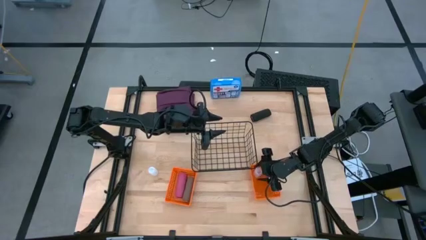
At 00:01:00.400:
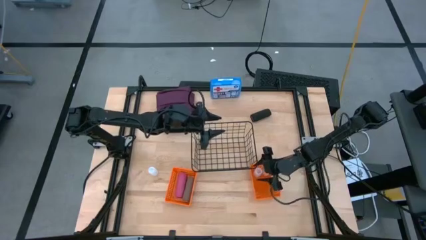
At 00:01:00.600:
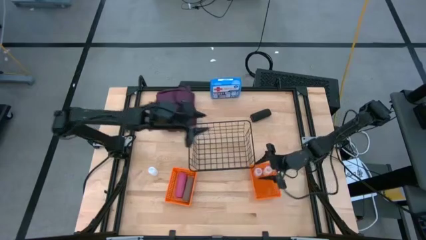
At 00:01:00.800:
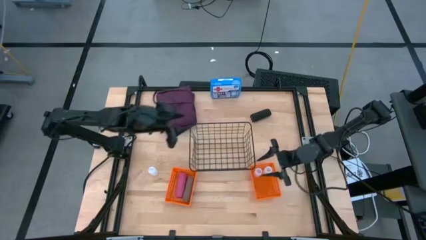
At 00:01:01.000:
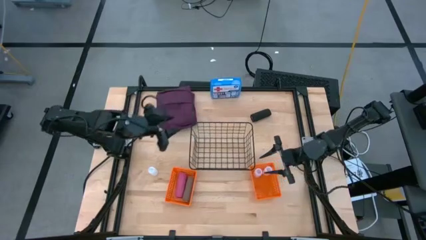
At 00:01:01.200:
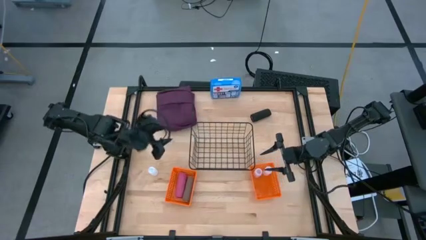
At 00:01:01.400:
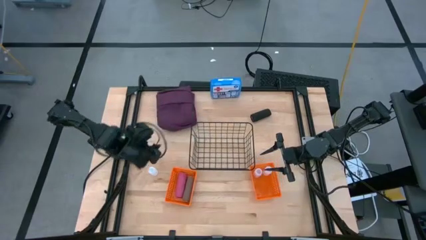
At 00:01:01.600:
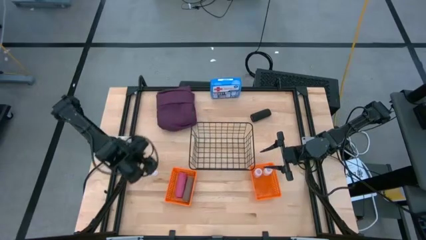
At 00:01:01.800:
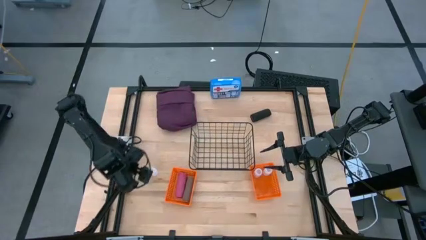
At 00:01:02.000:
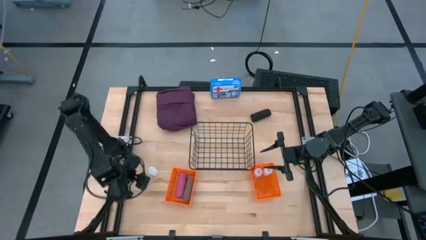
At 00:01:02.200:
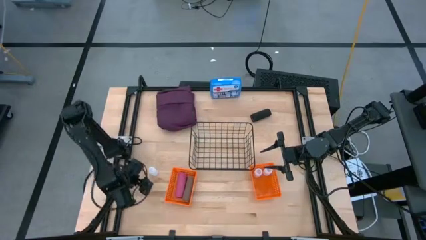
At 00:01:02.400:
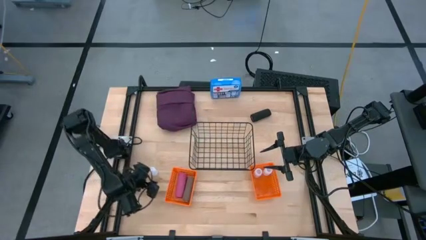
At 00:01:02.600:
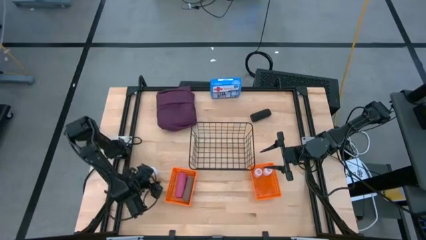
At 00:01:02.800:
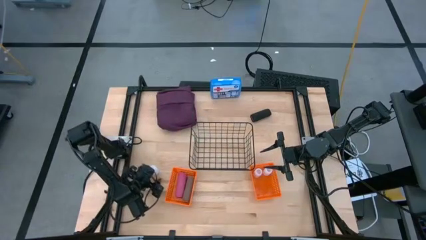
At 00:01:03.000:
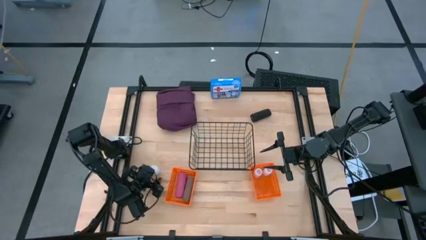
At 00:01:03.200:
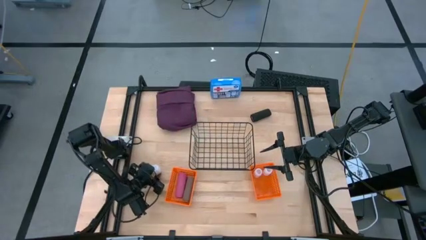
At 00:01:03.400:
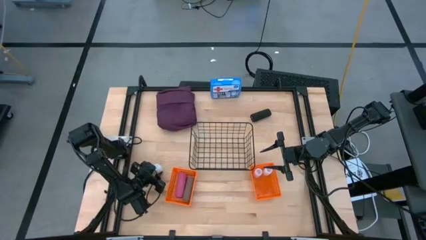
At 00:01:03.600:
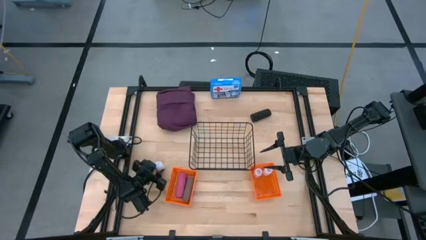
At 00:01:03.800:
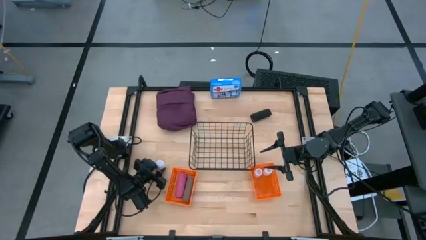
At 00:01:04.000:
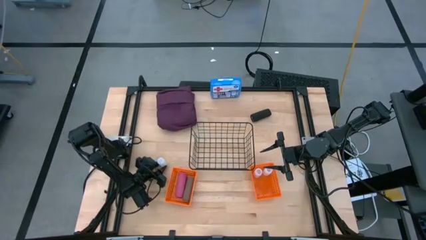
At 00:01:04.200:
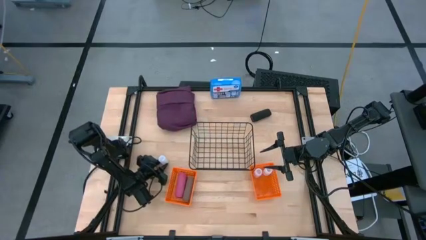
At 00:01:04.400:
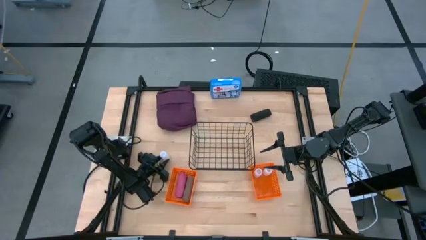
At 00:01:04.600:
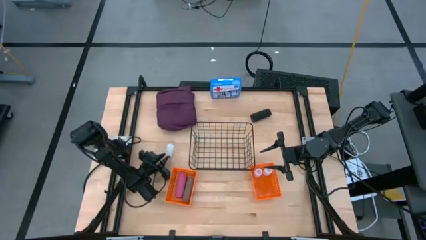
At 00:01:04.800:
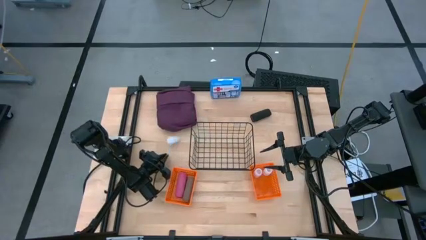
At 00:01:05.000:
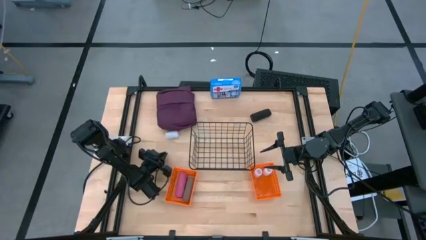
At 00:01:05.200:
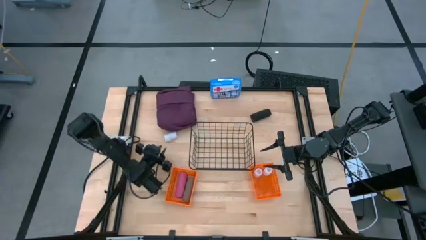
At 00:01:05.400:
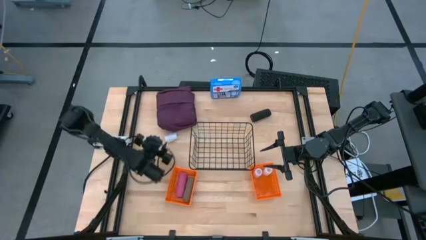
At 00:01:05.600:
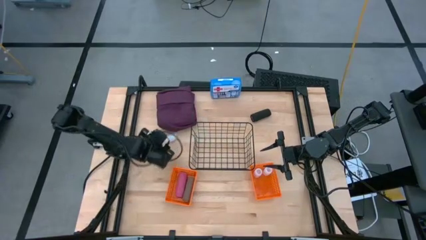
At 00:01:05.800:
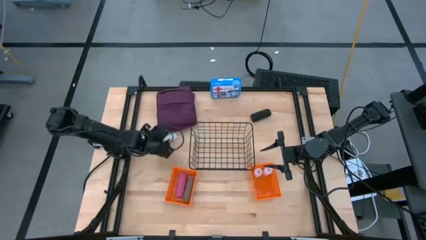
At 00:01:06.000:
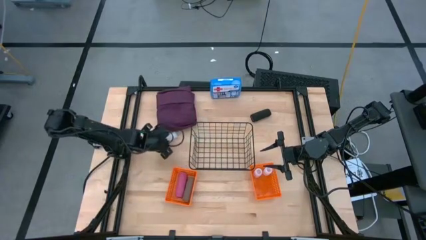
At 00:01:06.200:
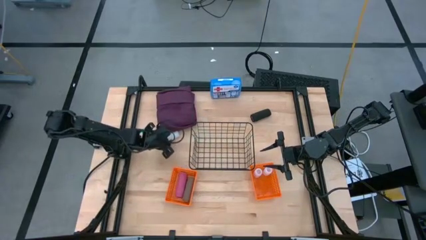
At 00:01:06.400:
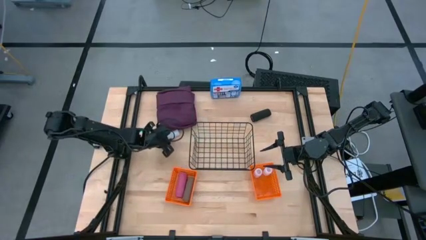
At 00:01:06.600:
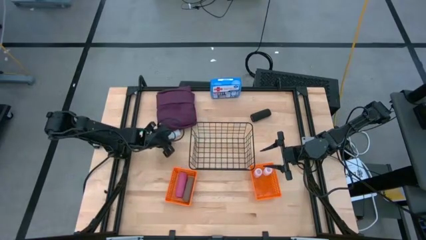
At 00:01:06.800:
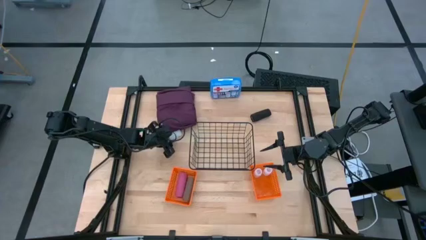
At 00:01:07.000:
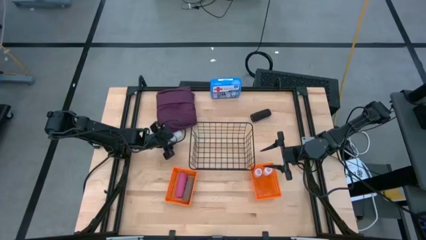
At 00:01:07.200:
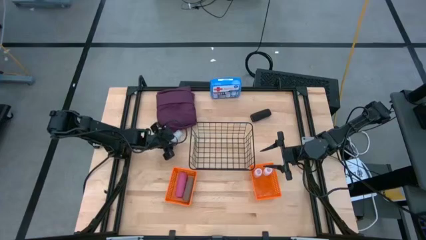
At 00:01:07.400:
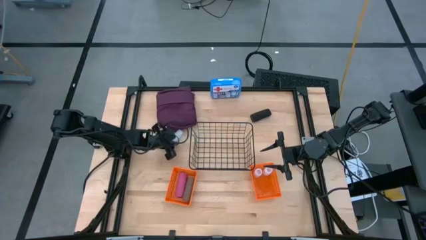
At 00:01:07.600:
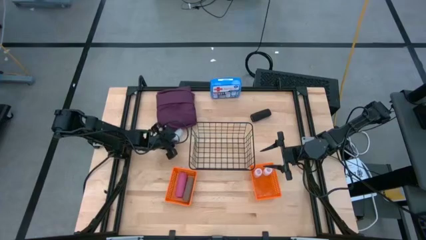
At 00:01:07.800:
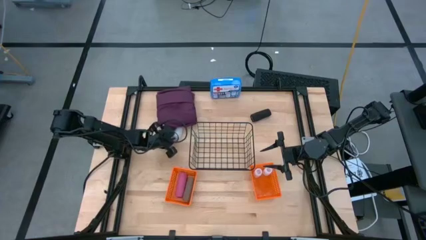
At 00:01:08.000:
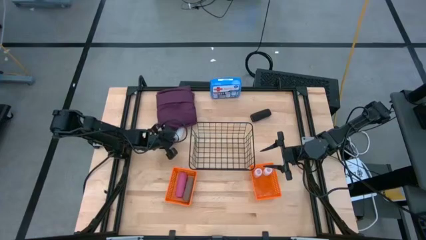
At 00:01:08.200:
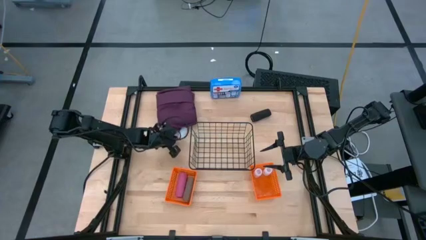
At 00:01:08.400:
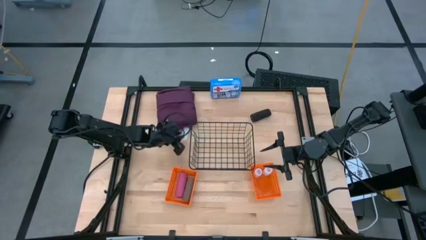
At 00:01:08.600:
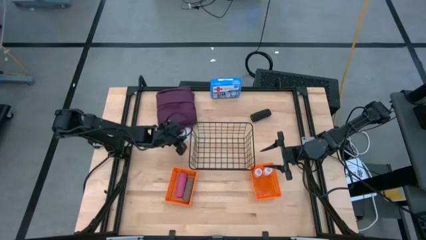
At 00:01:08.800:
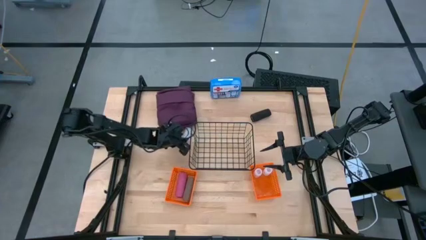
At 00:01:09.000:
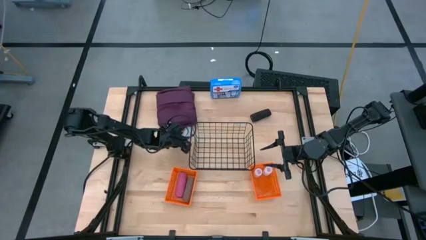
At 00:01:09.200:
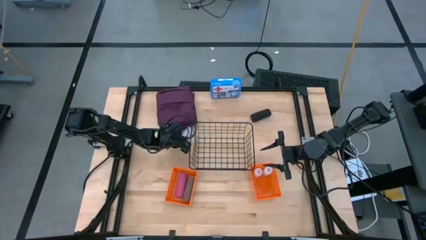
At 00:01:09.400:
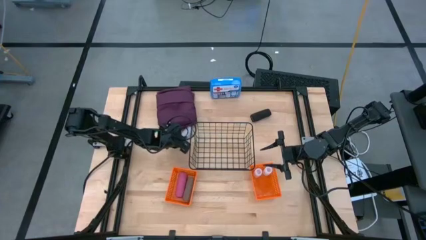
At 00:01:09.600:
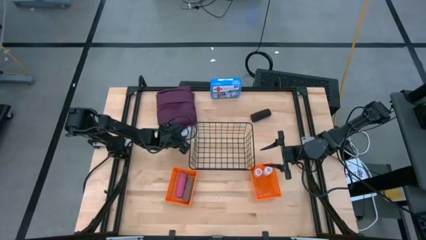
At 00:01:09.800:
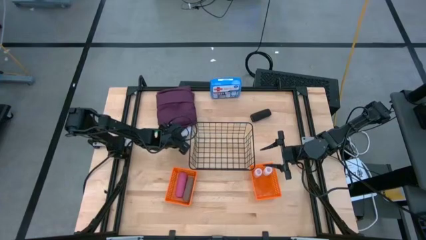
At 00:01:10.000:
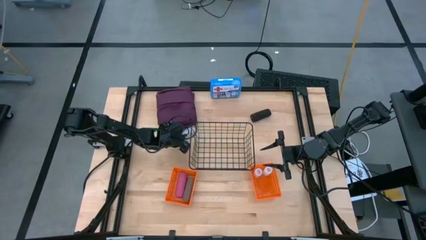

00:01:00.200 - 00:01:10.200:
Task: Pick & Place Medicine items
Put the white pill bottle into the right orange basket

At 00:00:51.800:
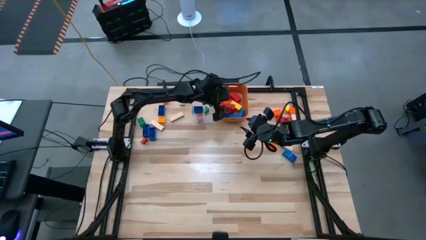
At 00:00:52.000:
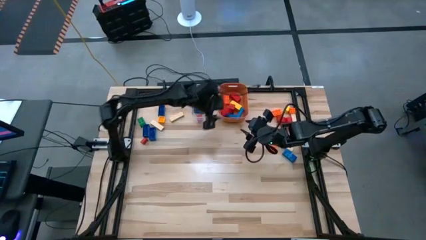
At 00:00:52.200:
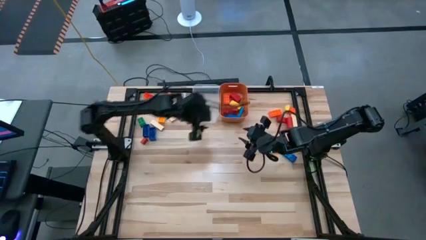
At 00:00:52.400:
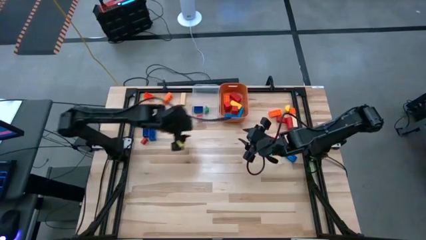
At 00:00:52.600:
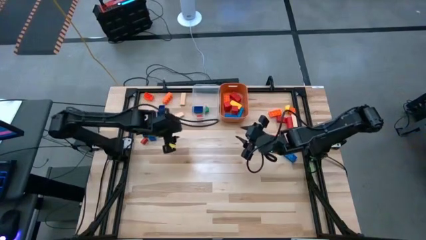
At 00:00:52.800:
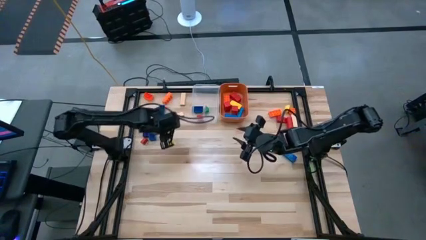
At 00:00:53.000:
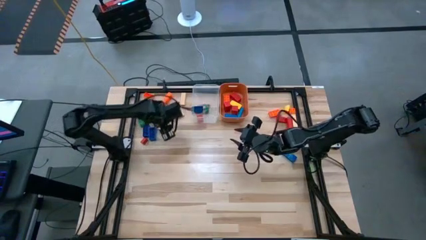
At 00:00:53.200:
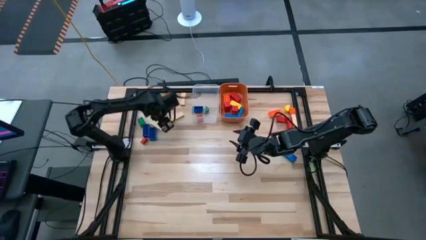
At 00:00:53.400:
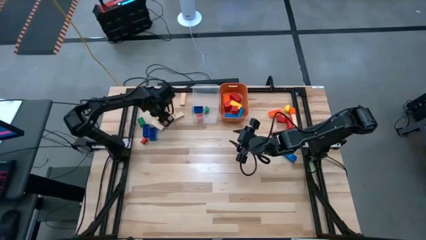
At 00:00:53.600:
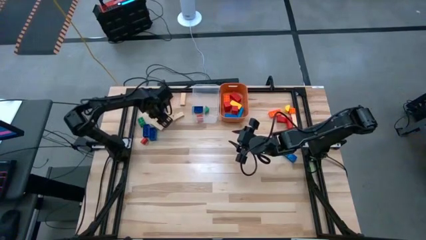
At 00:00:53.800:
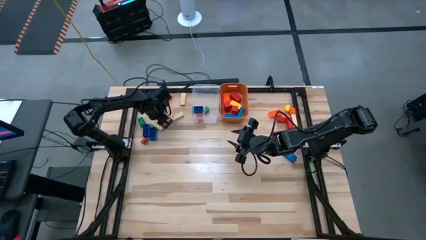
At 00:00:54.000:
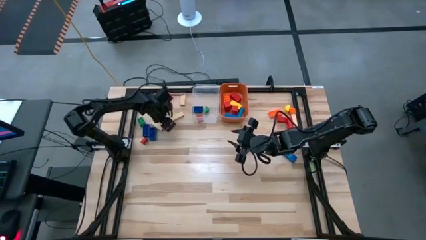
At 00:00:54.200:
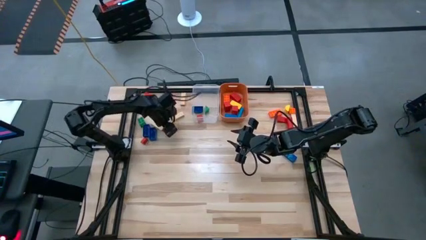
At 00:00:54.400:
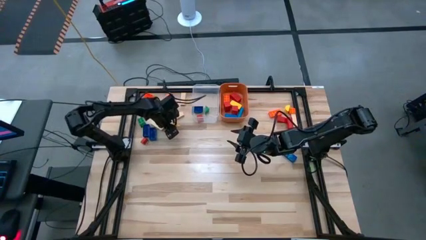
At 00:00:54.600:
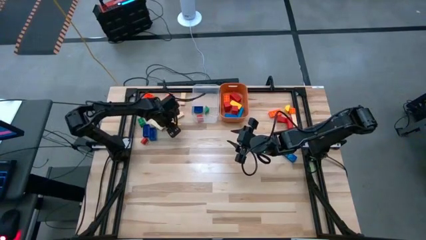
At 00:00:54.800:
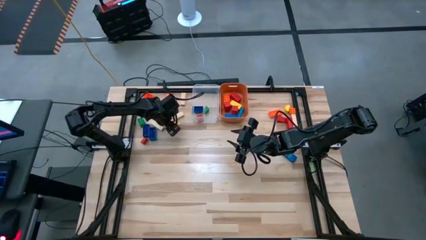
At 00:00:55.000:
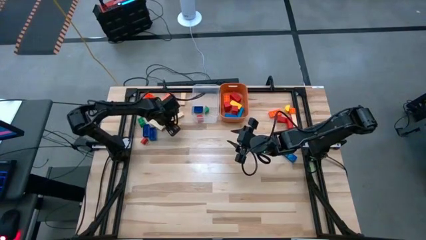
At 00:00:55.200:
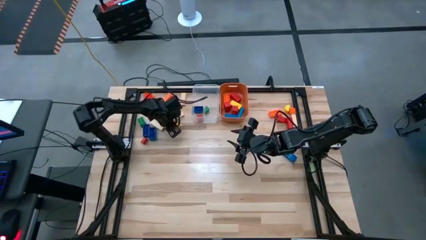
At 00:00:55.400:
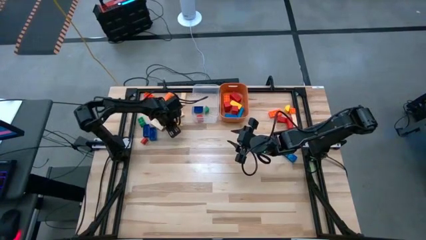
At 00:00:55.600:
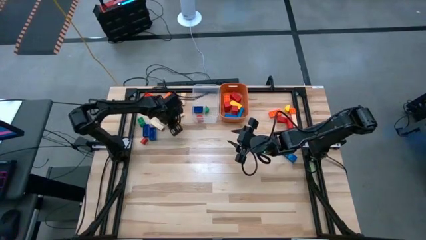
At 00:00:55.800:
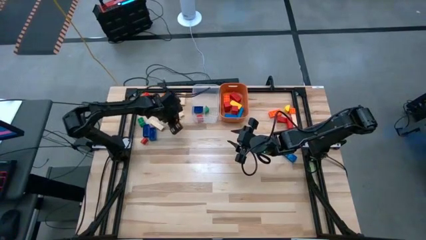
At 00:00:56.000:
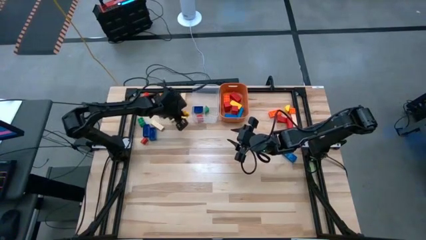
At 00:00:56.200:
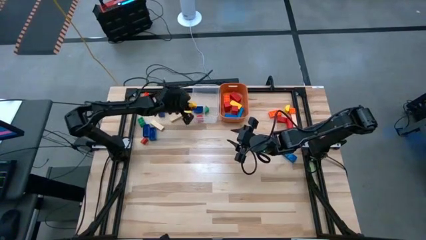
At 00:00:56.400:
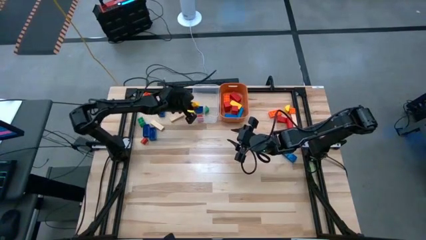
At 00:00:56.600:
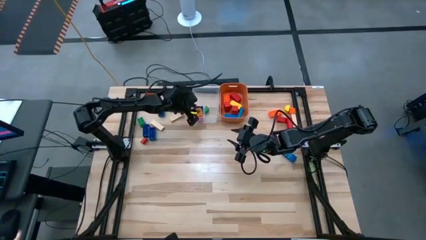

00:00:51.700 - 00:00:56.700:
Task: Sort blocks by size
Put the yellow square game piece into the clear bin

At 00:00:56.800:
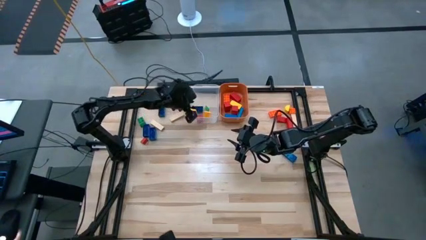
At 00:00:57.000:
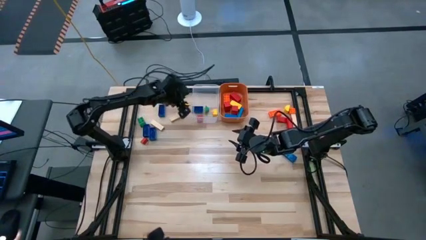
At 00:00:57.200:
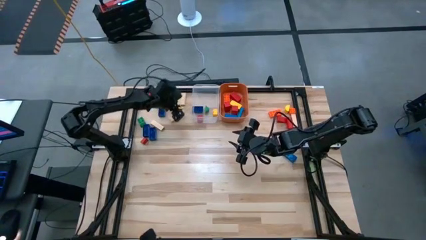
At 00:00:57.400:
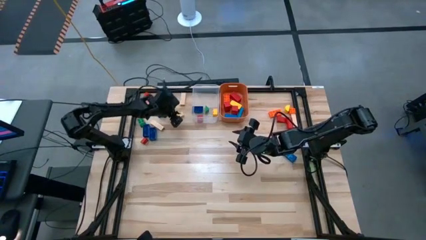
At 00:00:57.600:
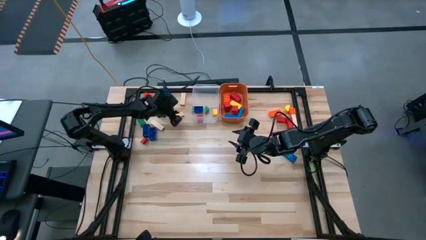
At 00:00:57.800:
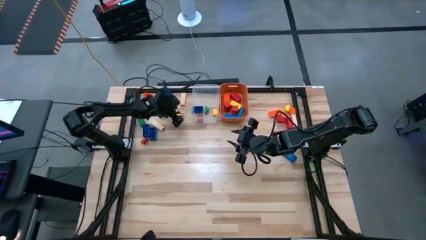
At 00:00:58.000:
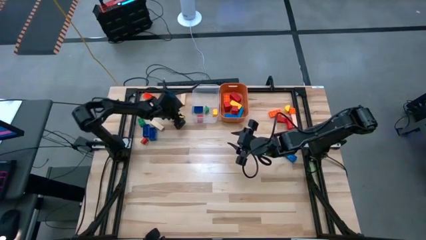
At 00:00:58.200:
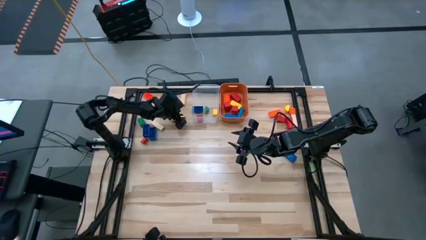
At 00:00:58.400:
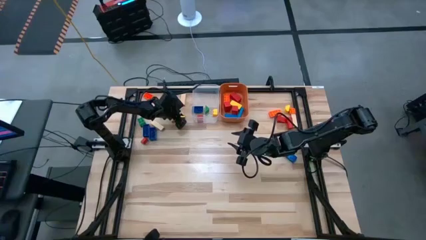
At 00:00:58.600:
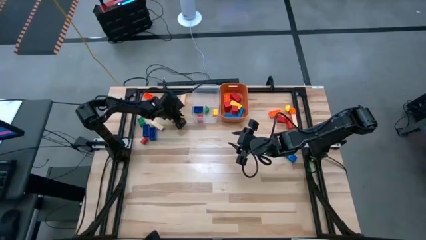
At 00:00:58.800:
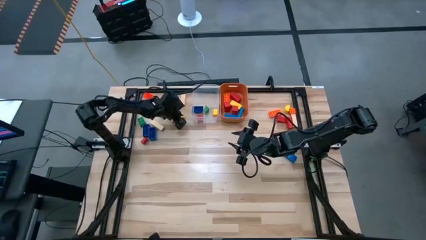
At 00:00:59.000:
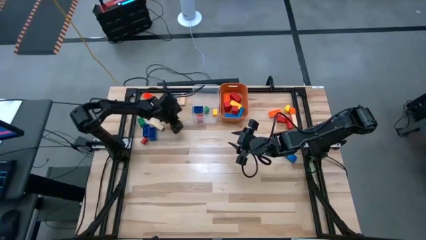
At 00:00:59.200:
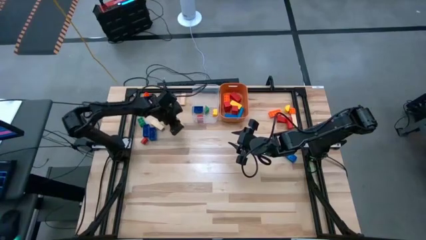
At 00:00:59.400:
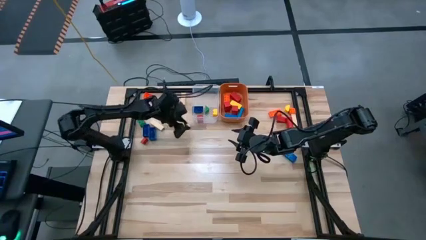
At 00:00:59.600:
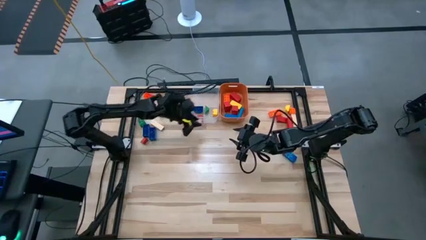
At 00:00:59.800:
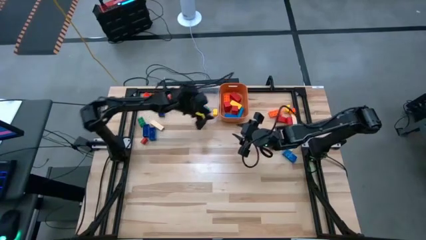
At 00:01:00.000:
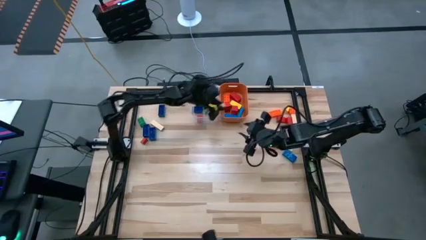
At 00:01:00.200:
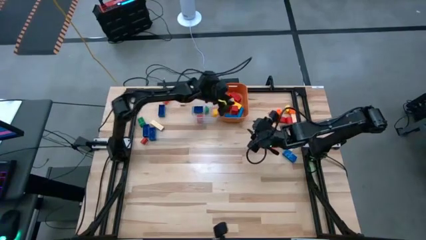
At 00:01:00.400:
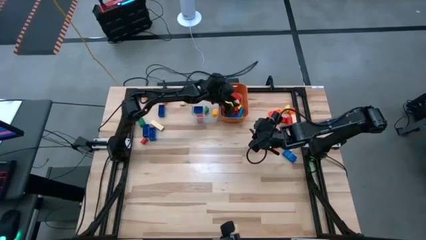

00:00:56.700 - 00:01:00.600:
Put the wood rectangle block into the clear bin
